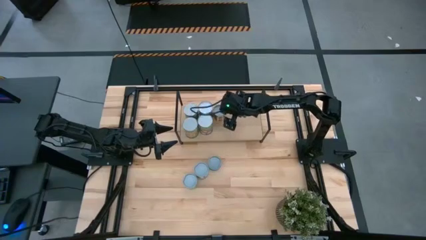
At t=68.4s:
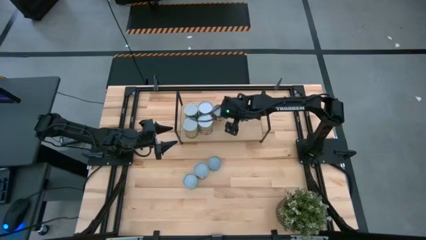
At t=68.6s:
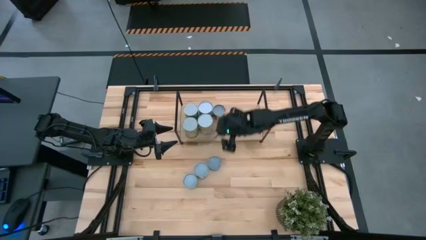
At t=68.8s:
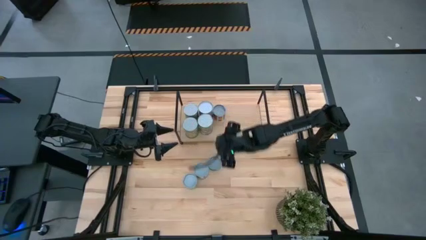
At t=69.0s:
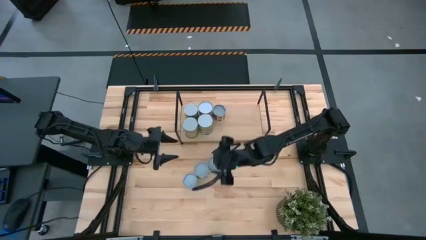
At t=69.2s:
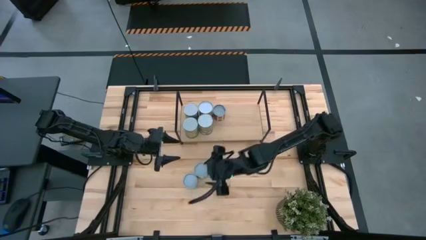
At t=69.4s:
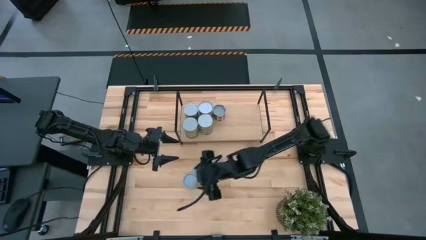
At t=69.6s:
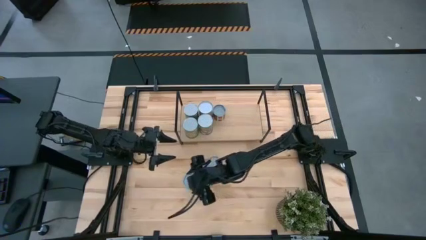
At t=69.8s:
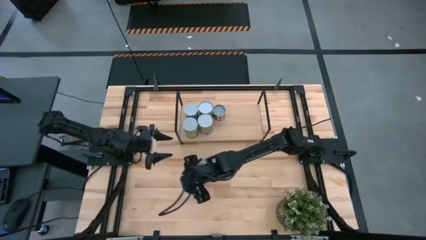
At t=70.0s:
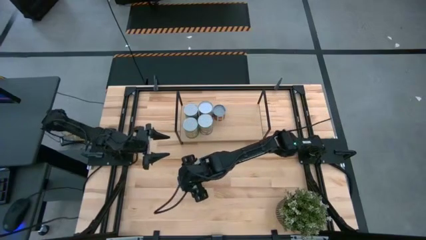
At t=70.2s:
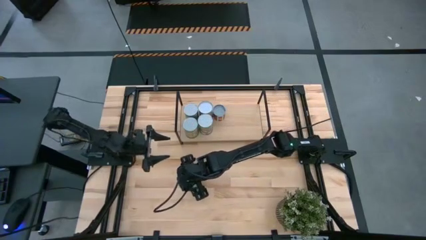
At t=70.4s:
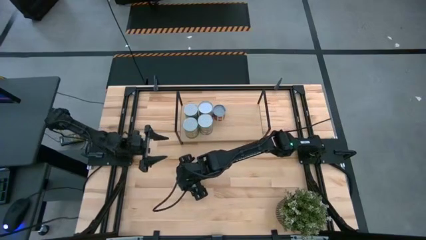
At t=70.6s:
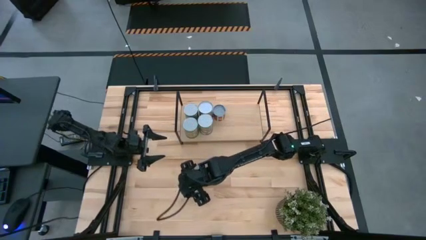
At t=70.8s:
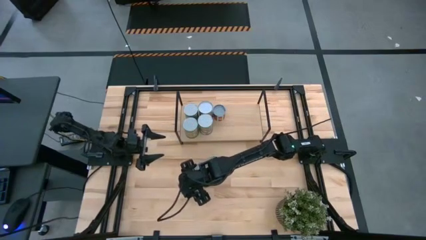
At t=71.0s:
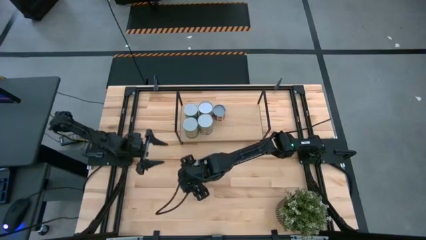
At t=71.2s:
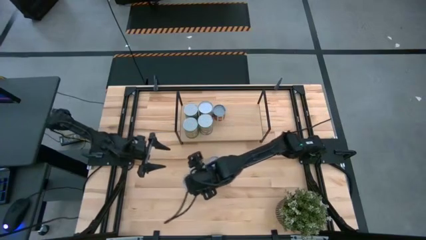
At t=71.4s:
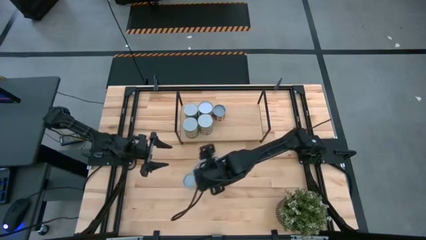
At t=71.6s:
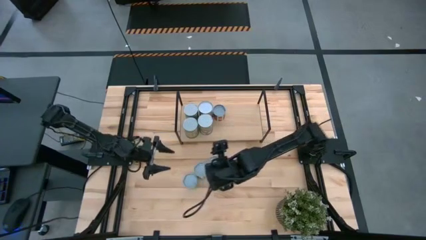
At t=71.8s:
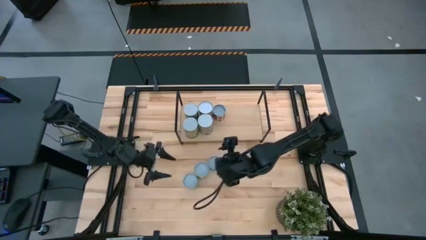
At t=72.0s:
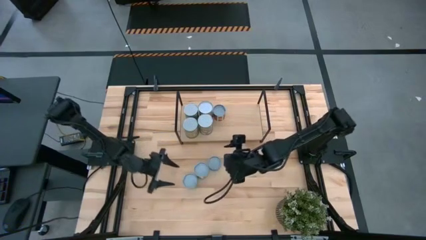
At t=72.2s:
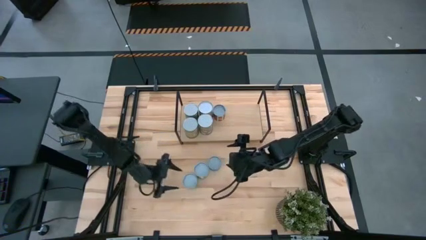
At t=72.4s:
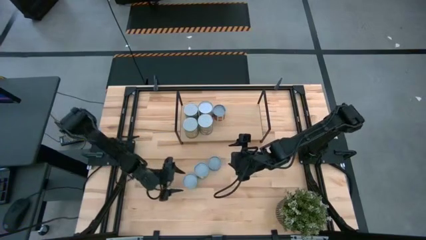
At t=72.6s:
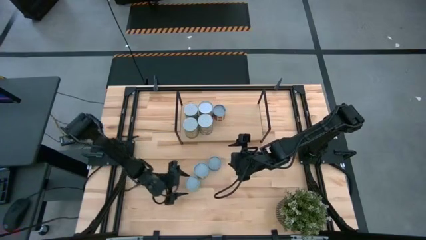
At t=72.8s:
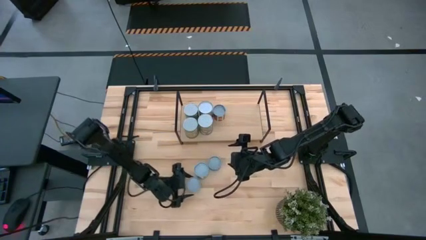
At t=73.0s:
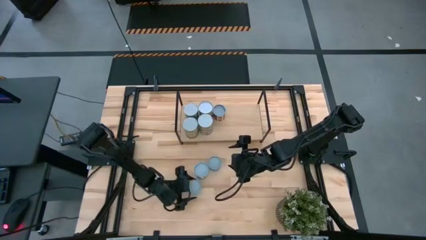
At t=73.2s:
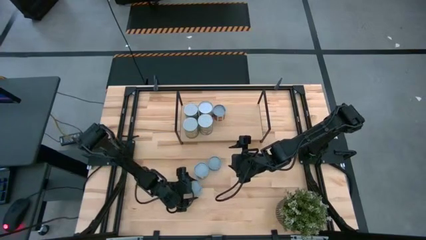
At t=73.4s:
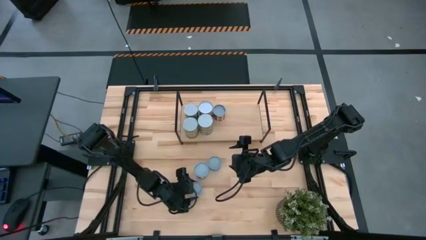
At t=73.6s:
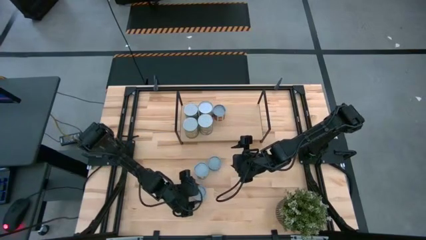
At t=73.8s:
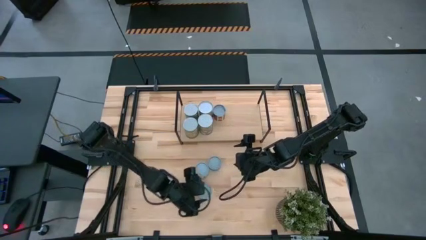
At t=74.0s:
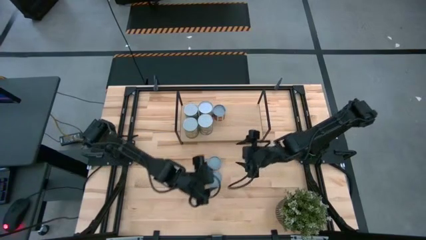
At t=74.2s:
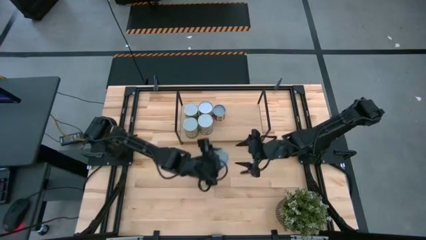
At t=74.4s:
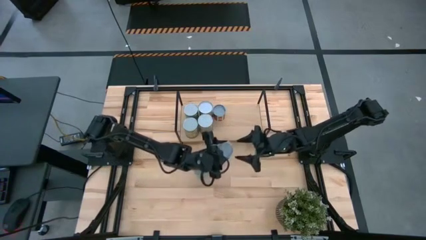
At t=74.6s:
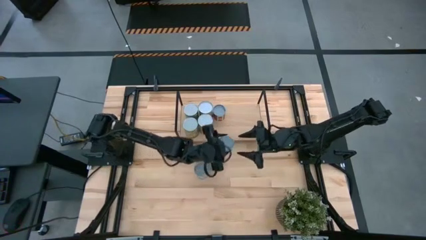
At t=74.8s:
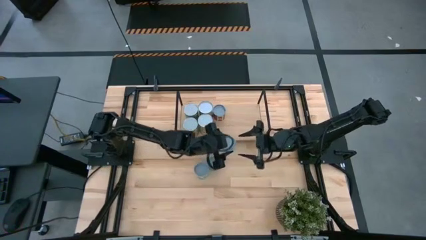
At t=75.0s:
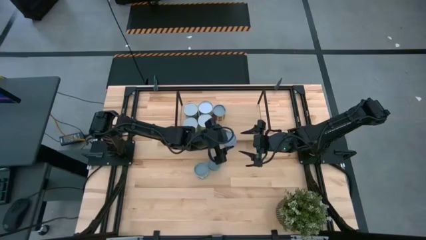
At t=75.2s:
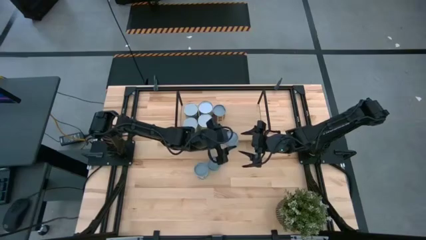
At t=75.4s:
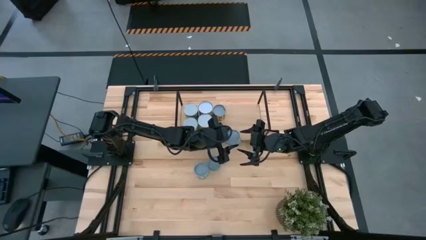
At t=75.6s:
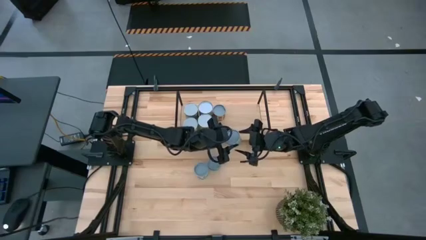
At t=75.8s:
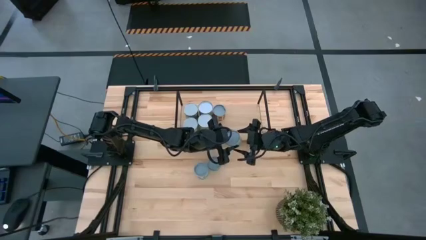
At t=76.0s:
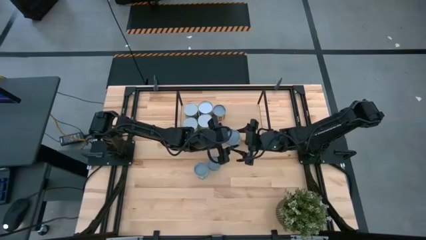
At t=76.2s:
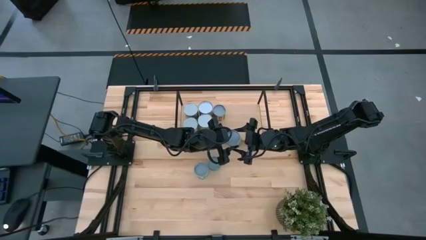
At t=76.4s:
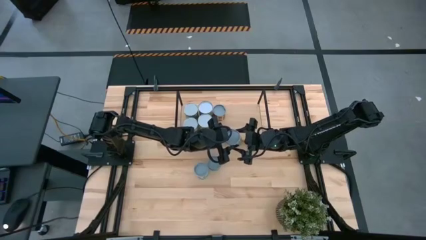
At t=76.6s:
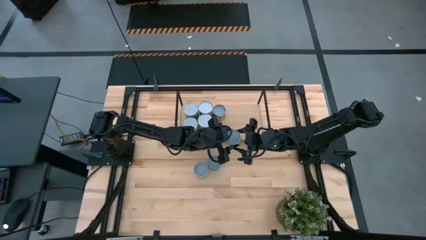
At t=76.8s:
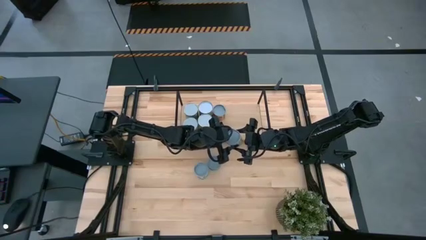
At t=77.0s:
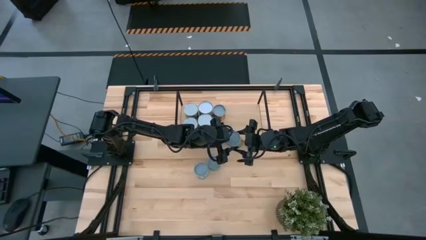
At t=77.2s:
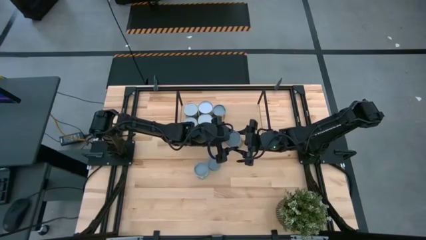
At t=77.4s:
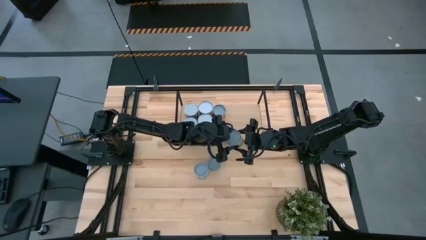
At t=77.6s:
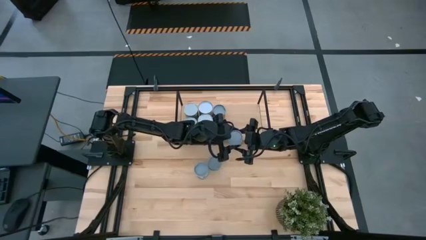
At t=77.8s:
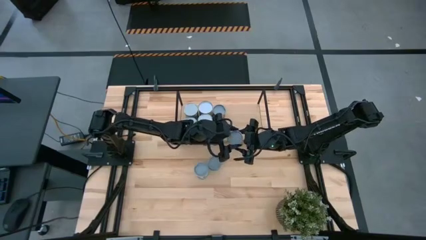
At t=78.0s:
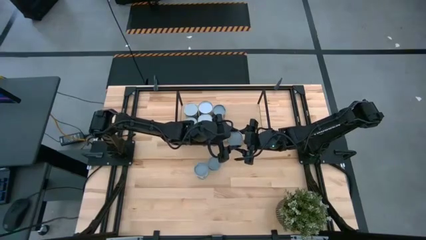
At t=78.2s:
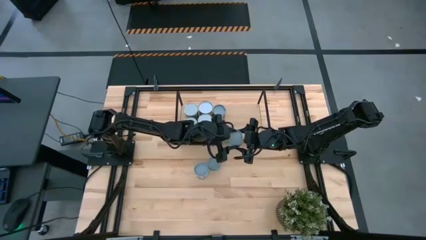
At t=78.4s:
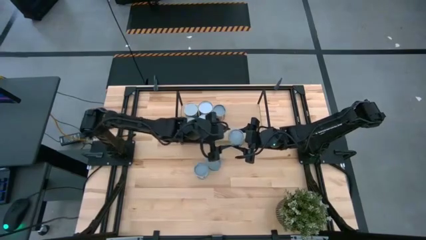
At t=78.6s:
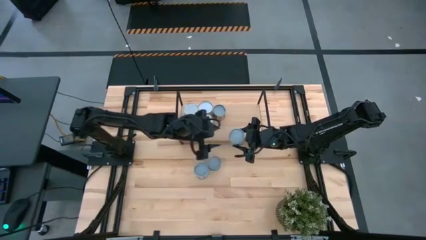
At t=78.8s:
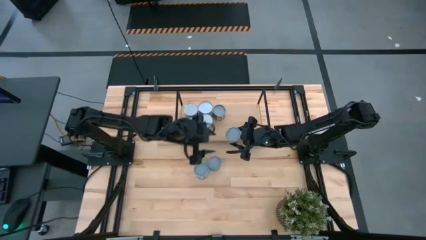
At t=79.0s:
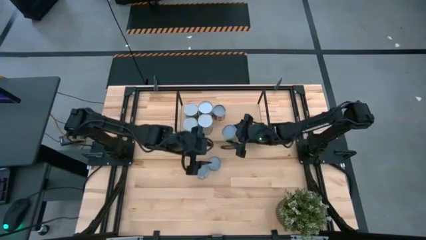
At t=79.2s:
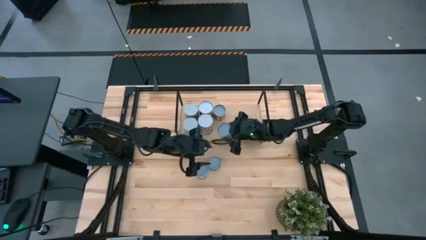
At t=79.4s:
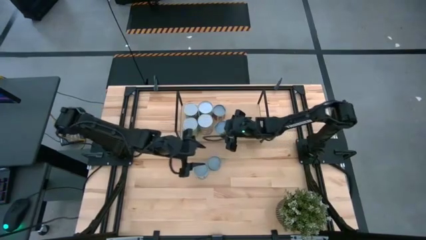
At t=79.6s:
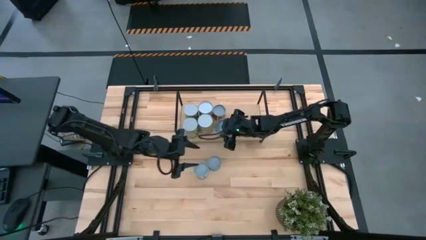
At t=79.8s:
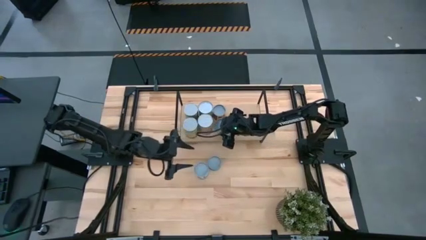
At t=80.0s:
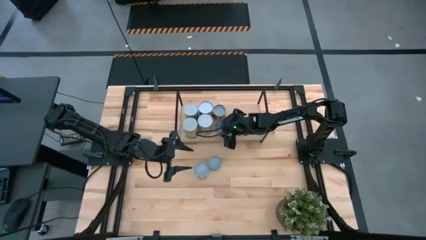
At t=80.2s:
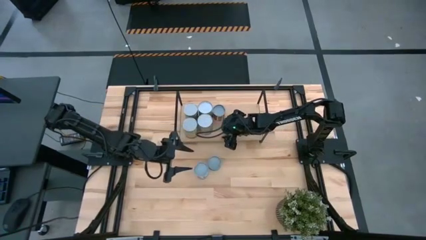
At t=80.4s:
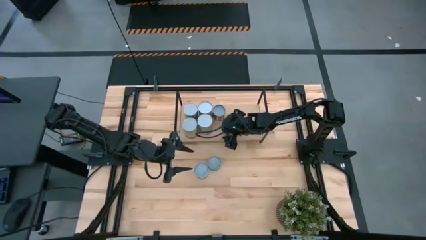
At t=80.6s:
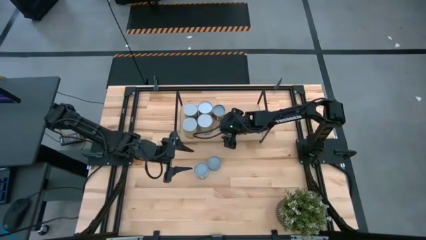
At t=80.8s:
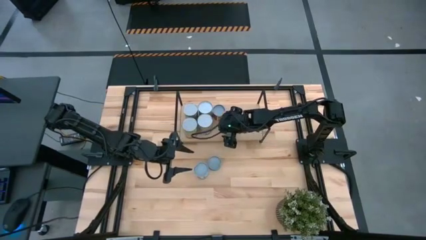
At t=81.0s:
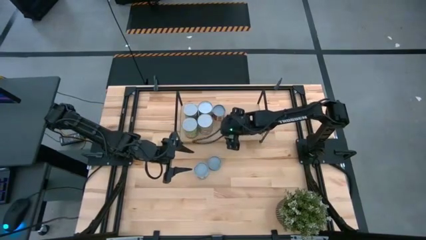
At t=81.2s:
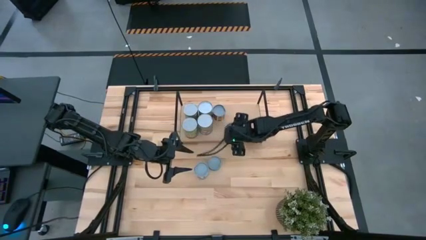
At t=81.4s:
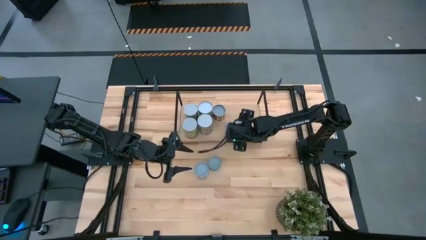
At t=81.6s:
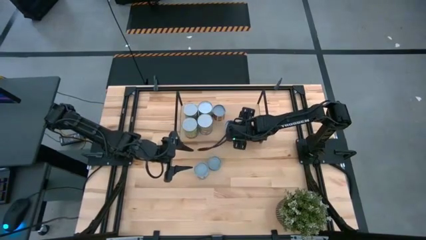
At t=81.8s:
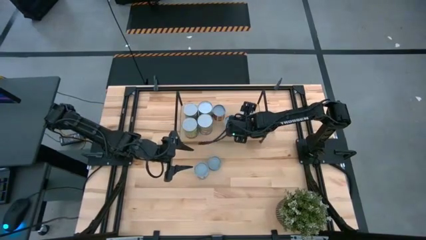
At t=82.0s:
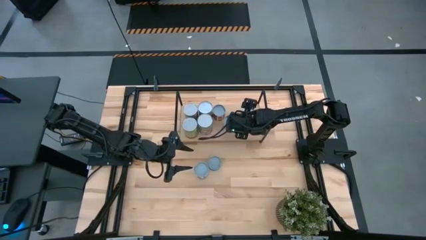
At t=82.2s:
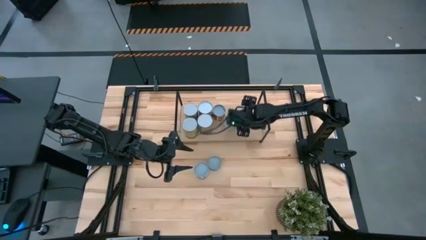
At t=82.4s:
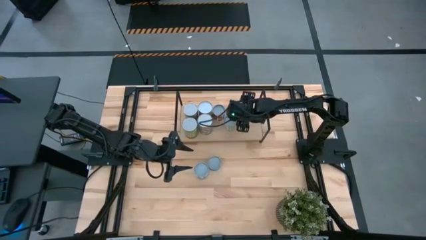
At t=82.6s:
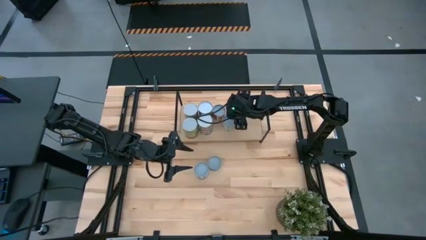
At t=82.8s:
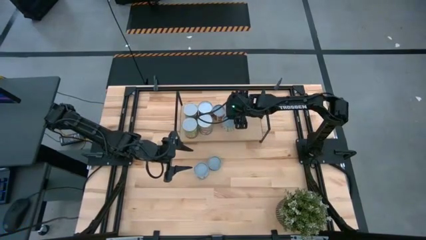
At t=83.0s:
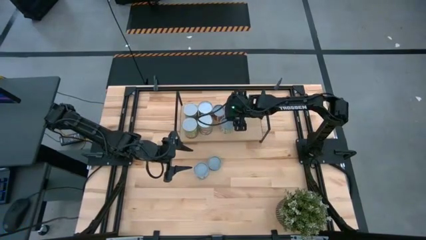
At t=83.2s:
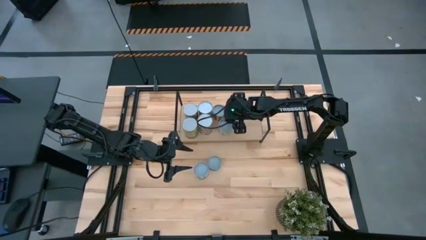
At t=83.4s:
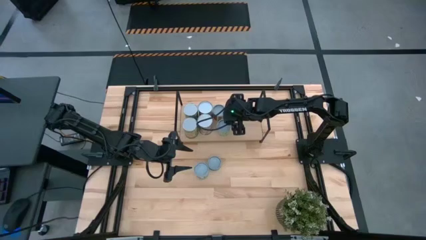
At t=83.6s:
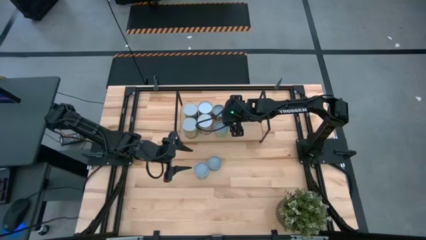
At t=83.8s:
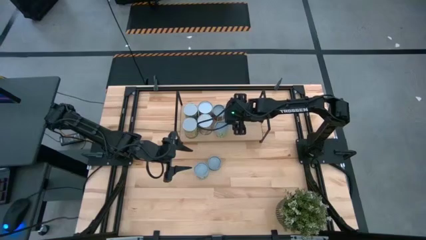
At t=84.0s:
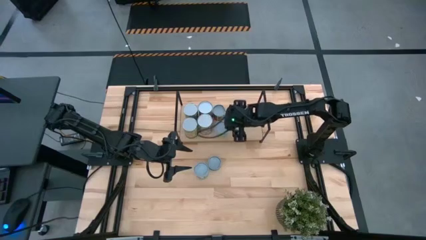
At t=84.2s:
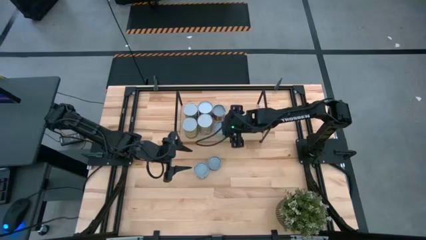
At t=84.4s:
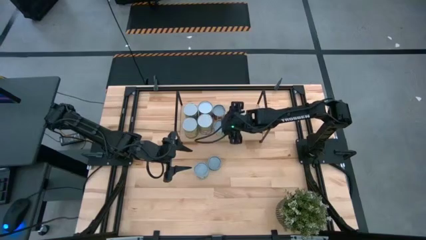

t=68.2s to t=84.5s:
Task: Pick and place cans onto a shelf
Put the canned peas on the shelf
